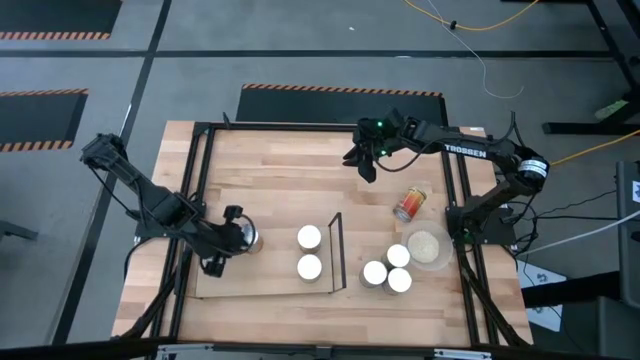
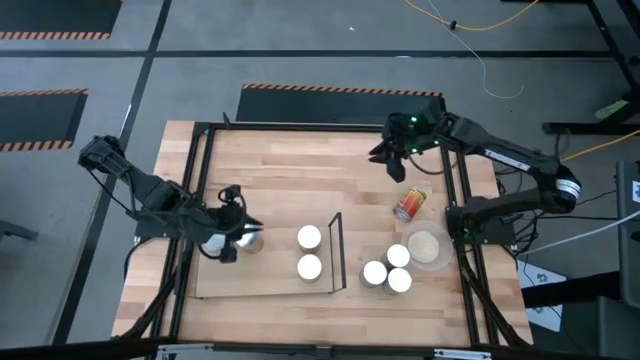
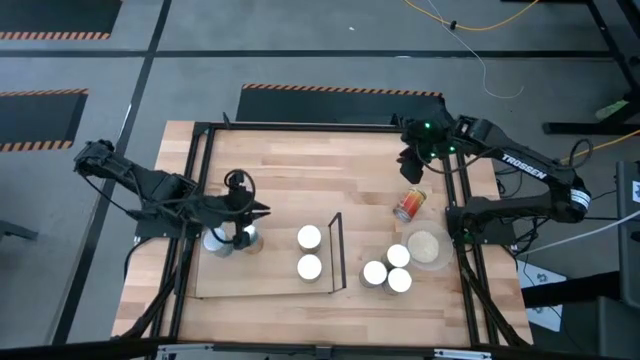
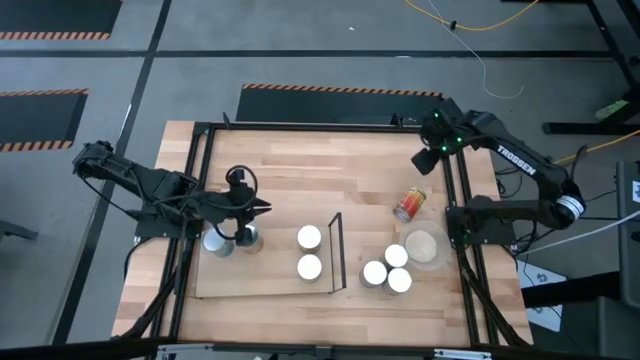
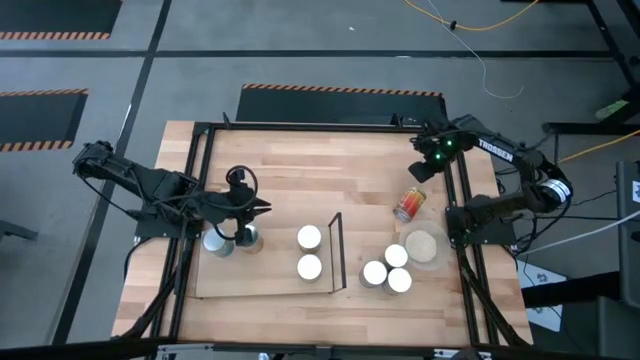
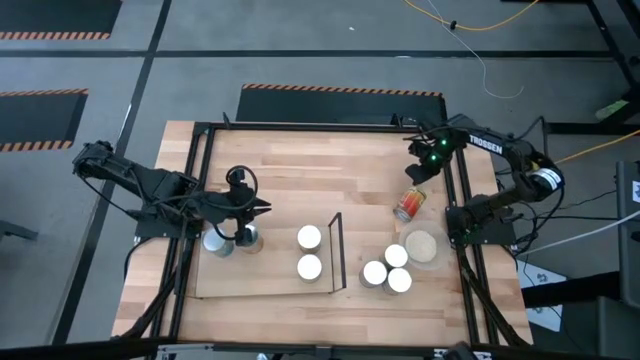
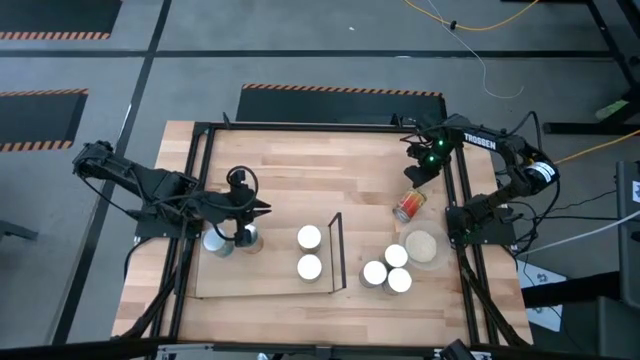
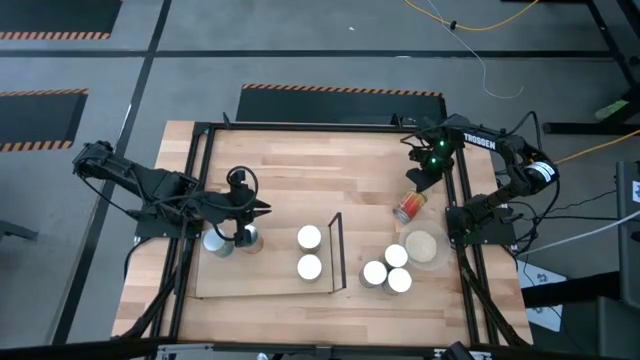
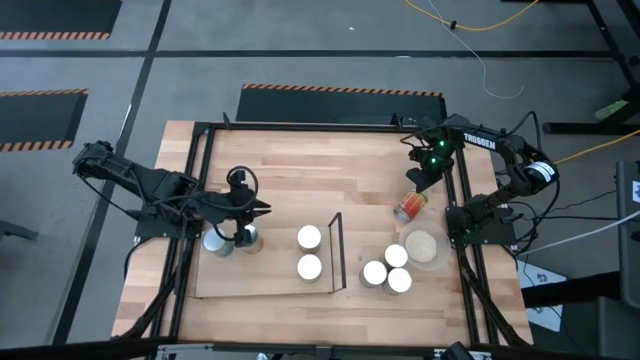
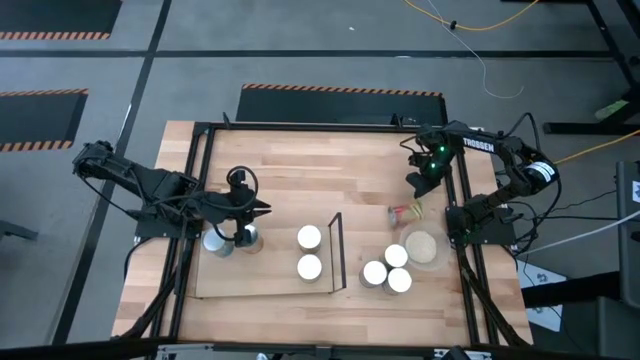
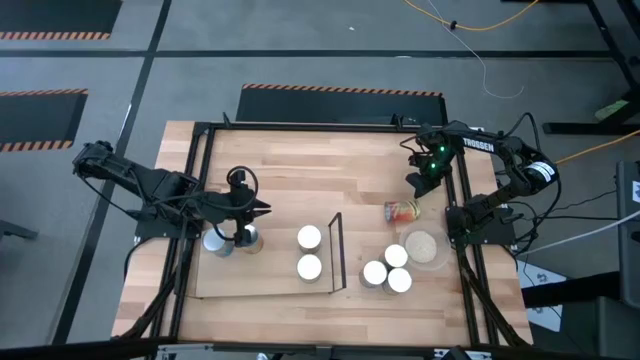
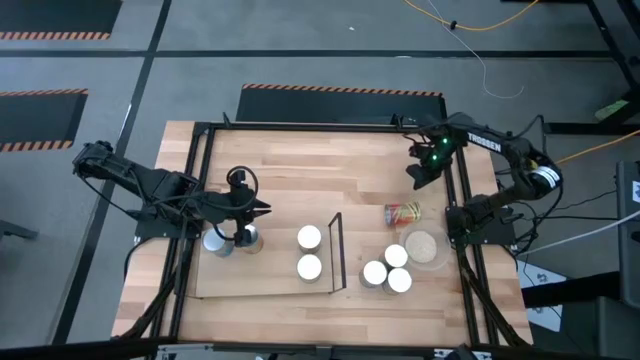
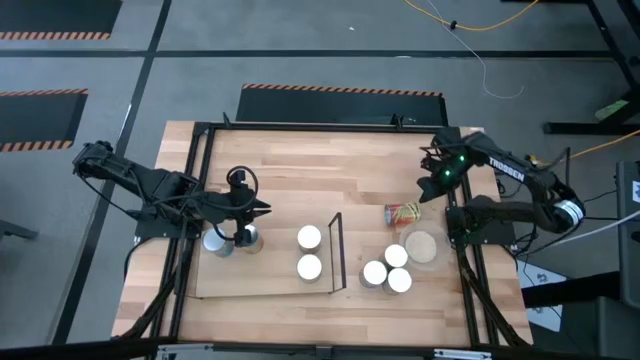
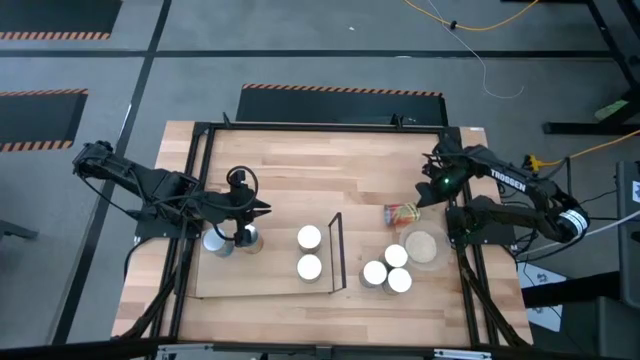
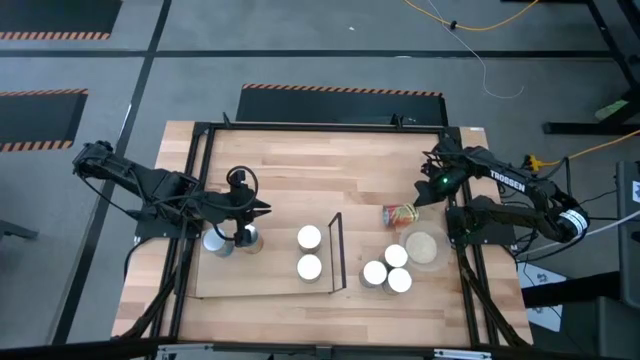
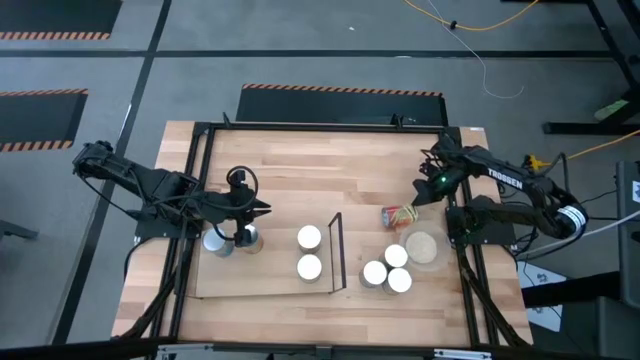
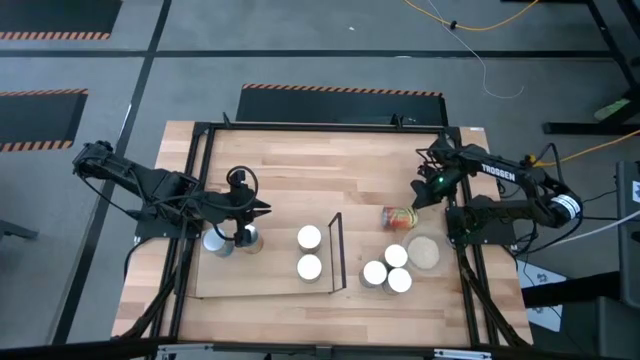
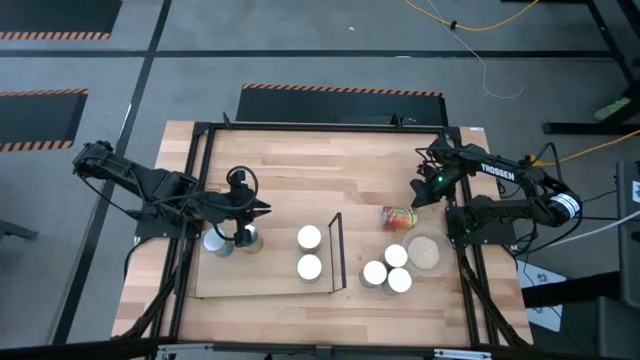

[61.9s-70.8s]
Task: Pick and place cans onto a shelf
Put the green bean can on the shelf

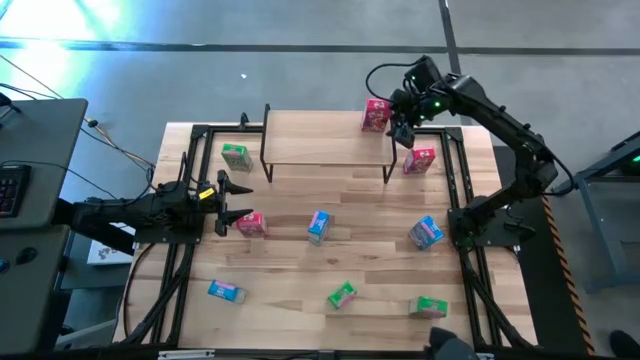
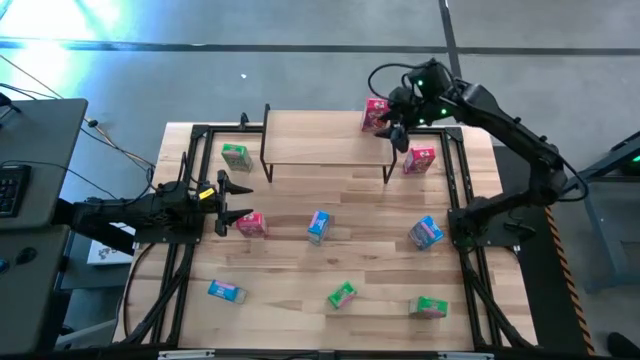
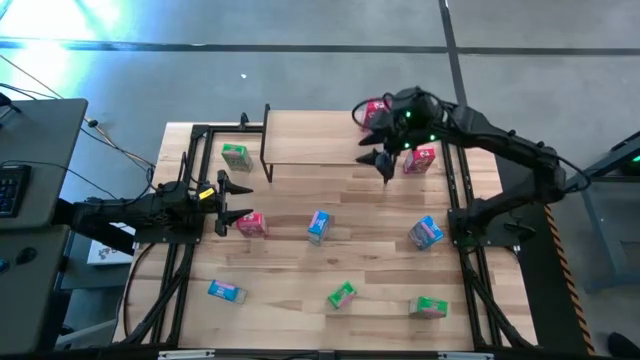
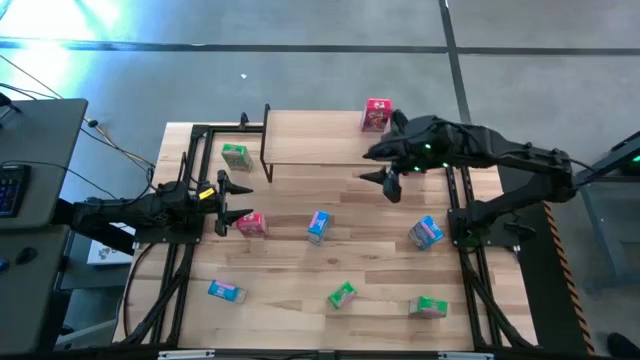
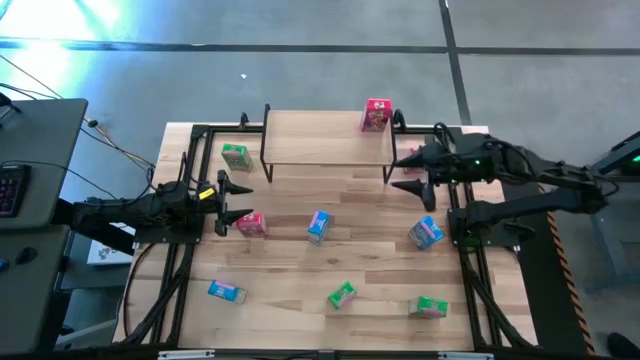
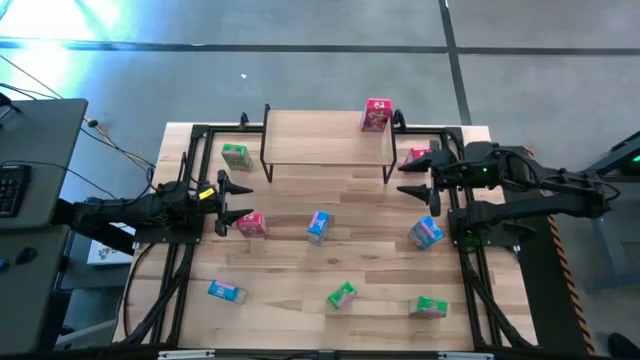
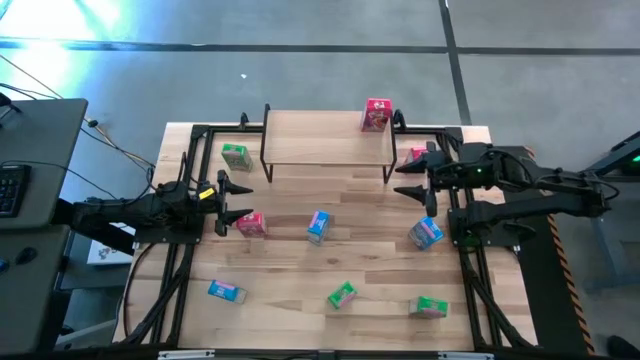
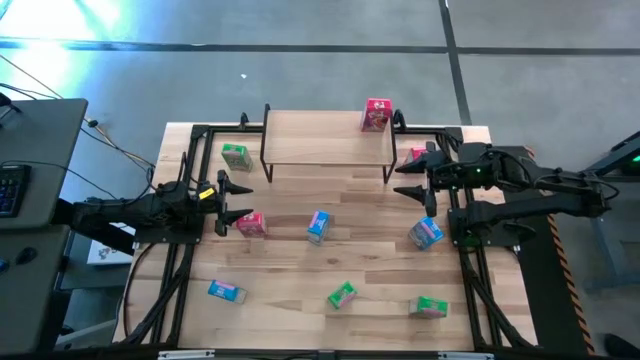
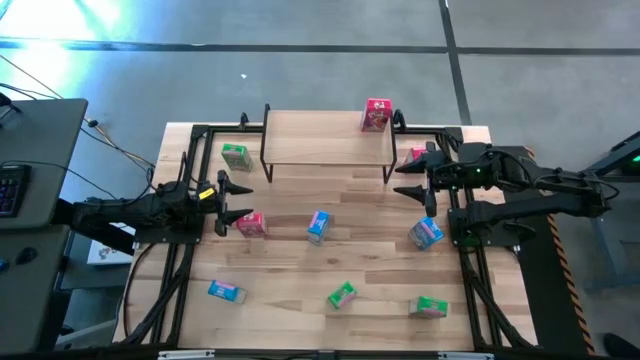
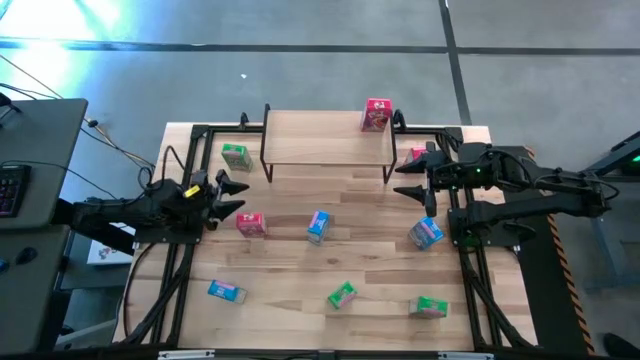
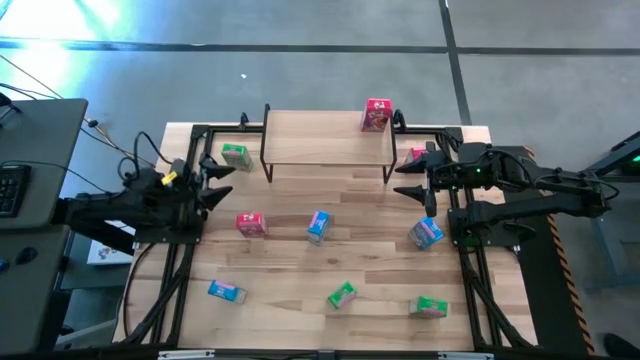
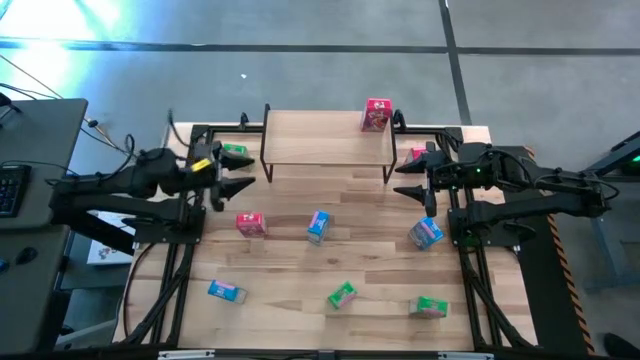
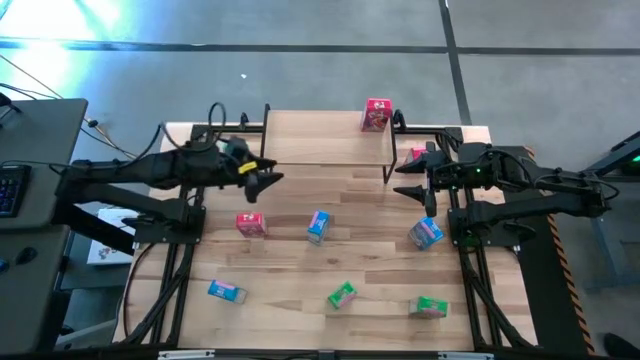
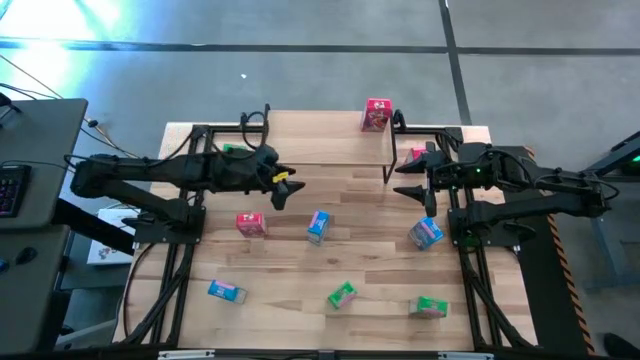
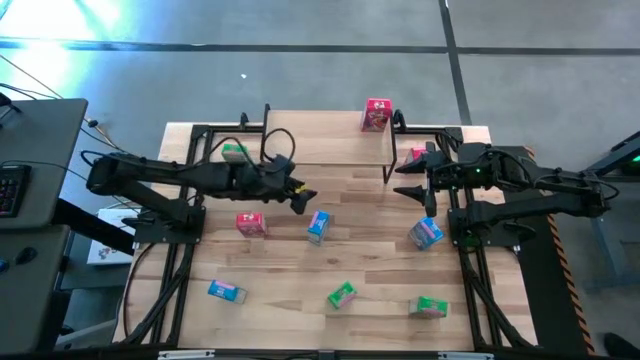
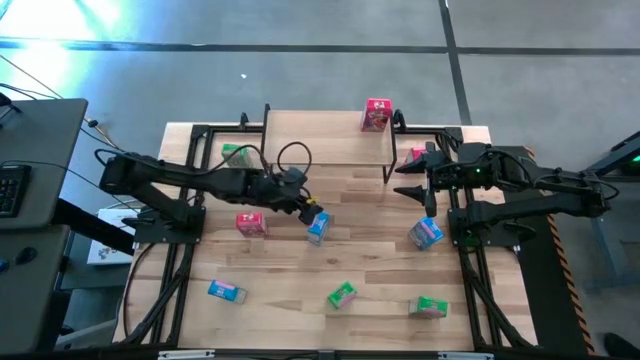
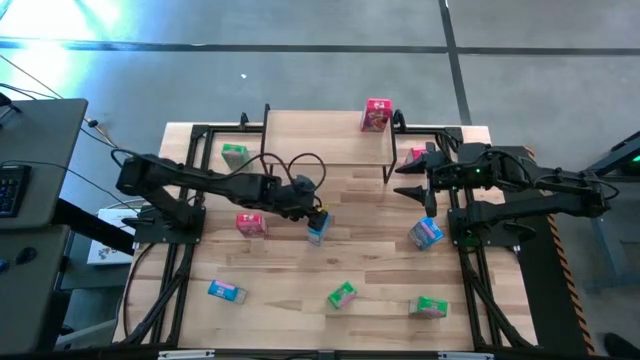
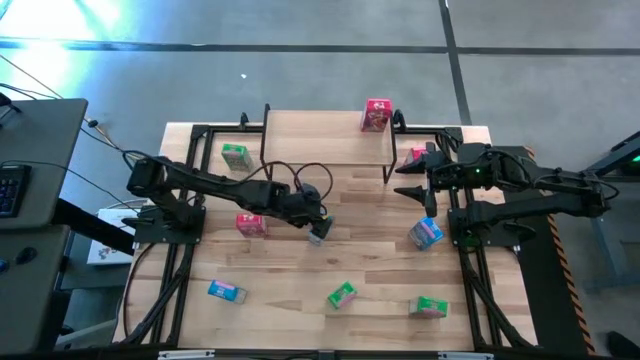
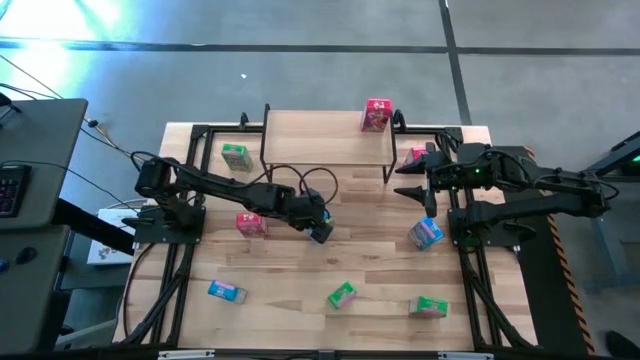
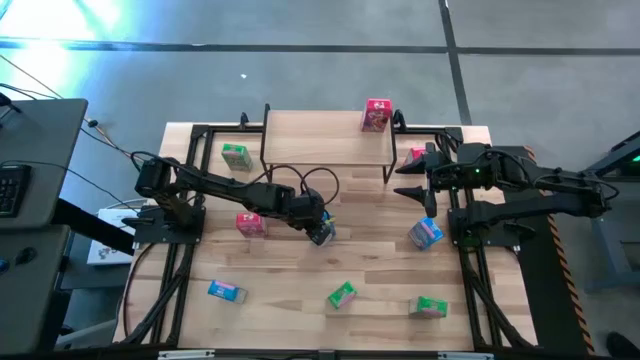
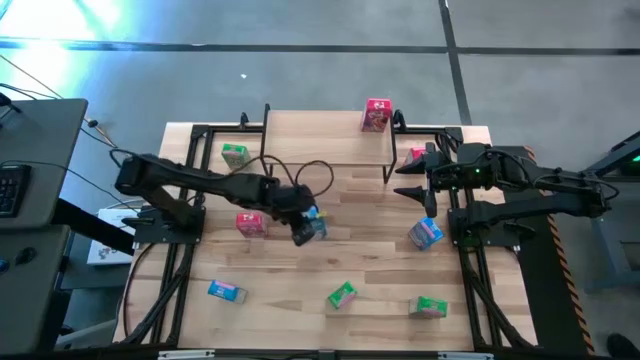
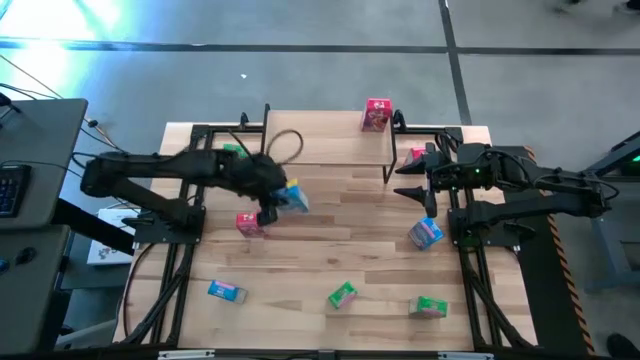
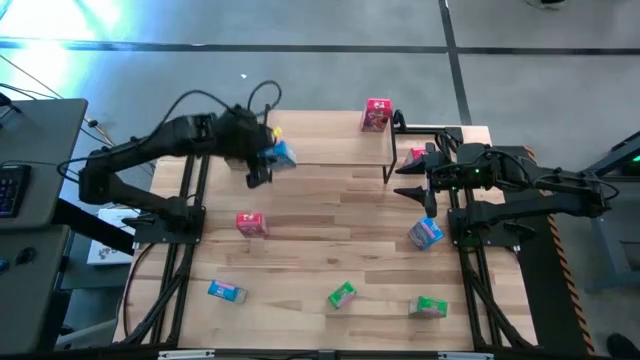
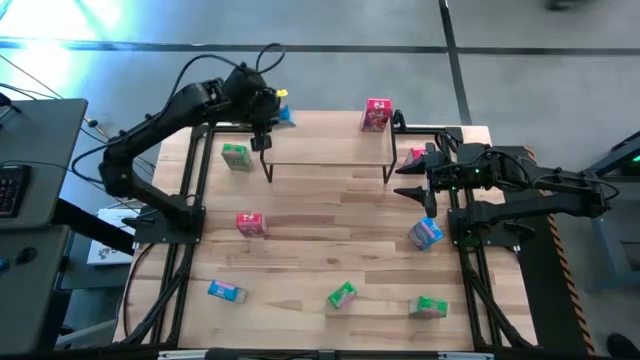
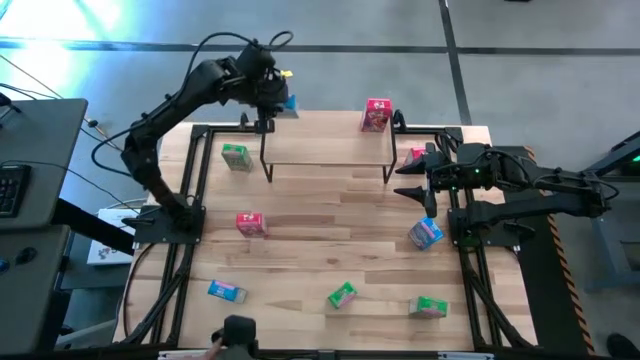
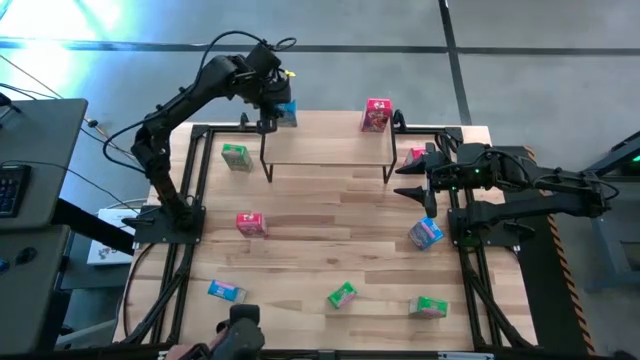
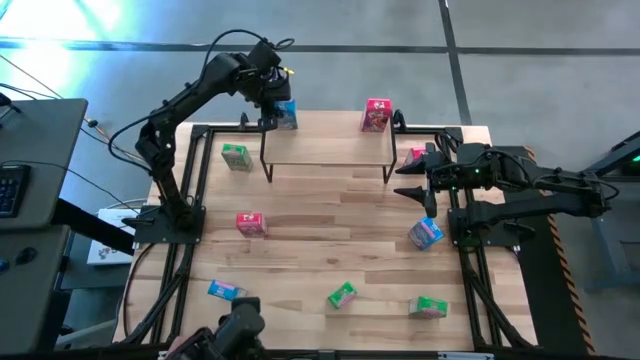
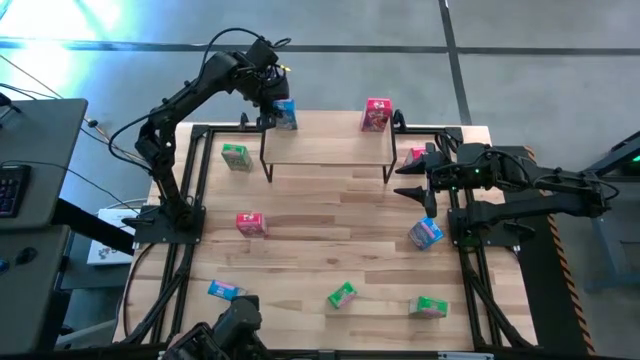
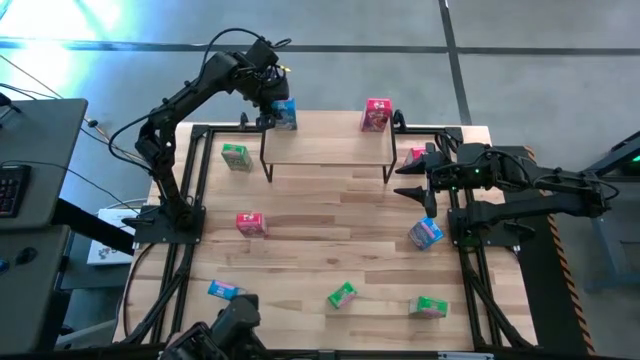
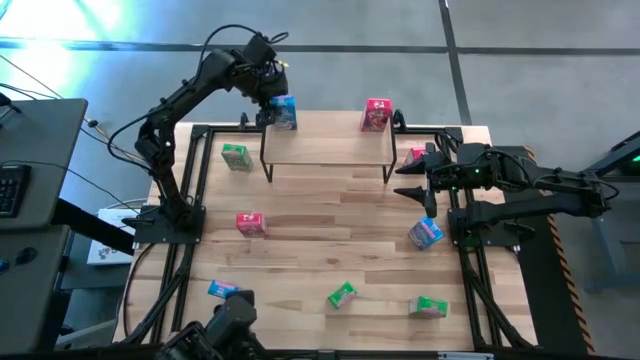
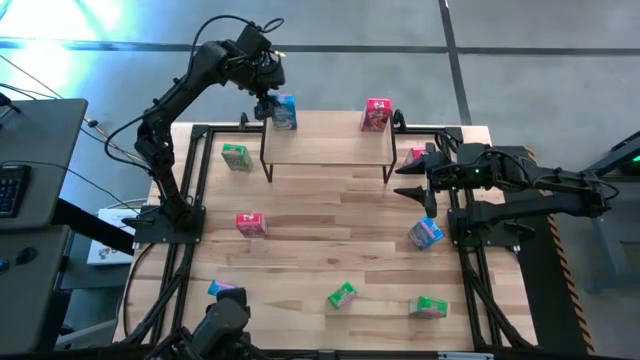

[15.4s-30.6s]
Task: Stack cereal on shelf
Put the top left blue cereal box on the shelf
